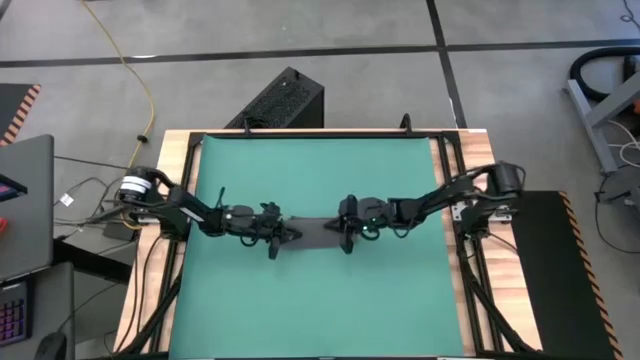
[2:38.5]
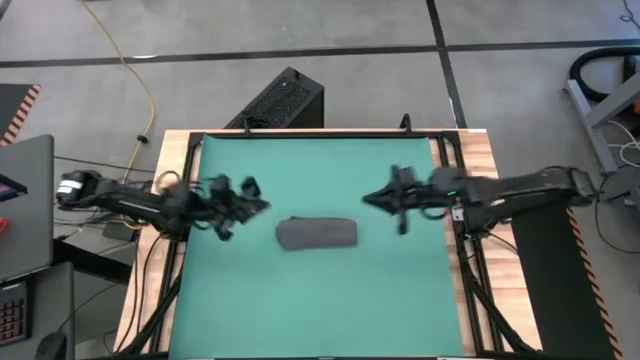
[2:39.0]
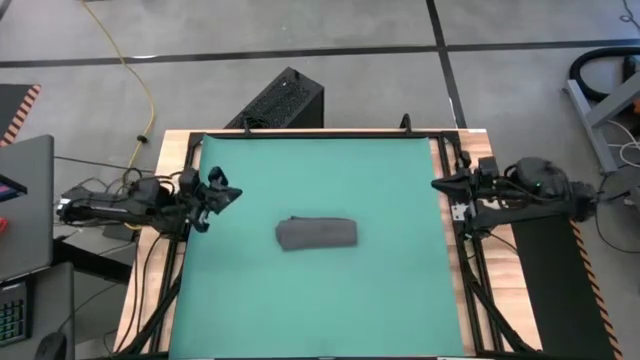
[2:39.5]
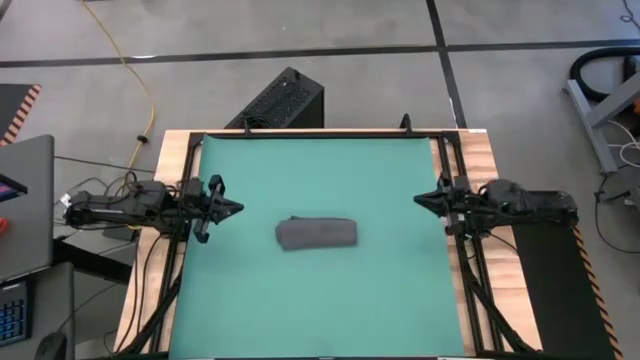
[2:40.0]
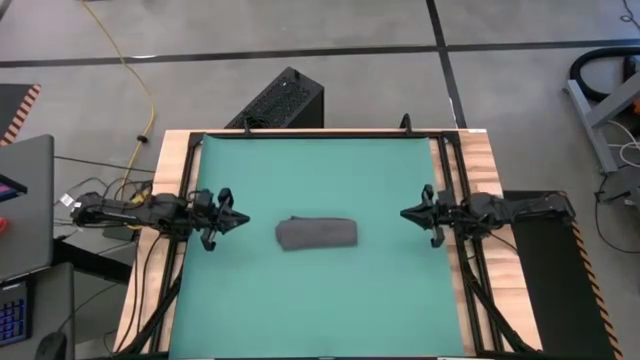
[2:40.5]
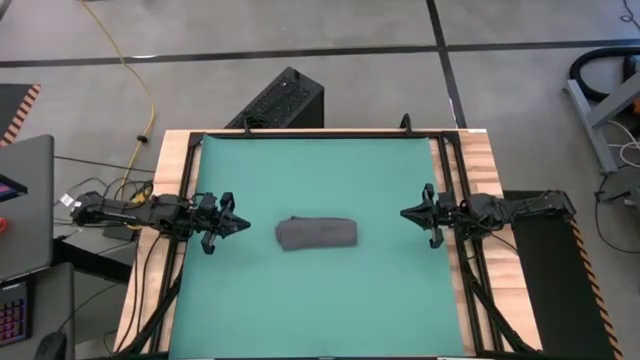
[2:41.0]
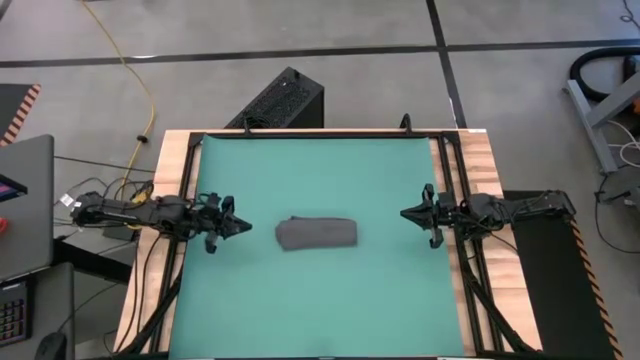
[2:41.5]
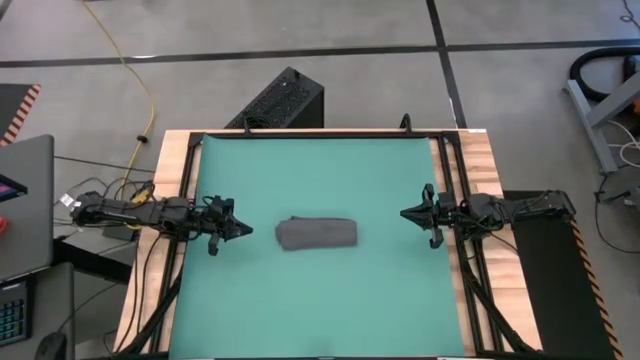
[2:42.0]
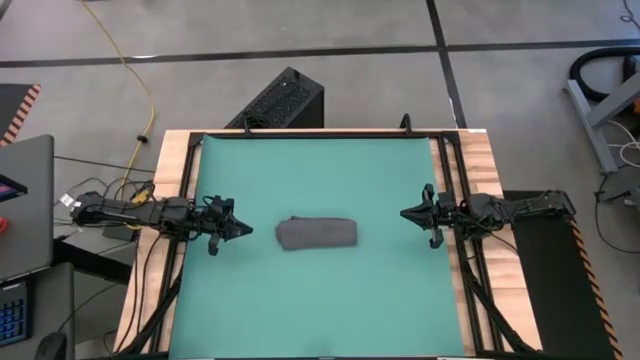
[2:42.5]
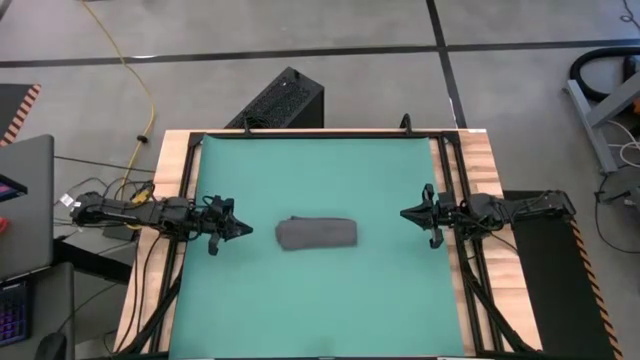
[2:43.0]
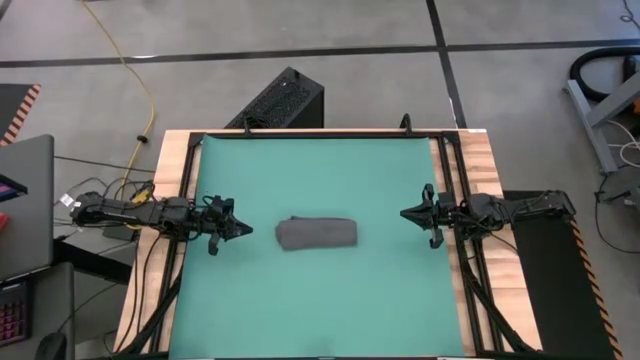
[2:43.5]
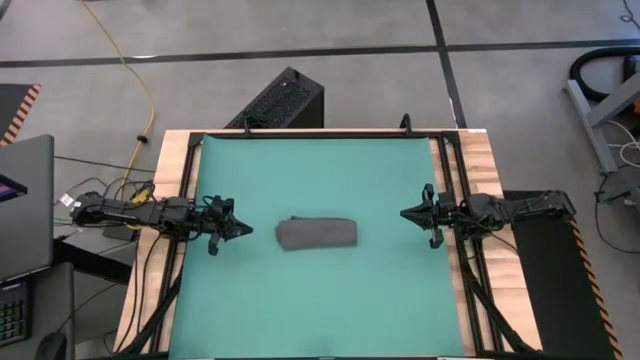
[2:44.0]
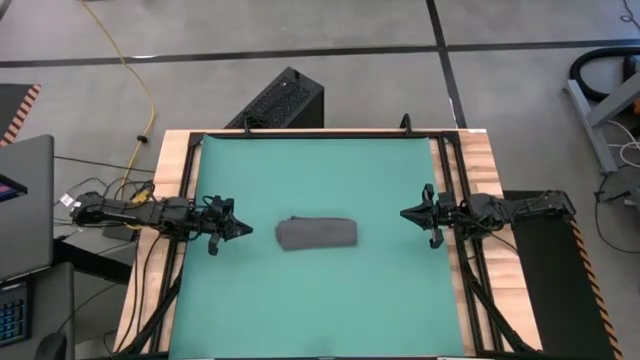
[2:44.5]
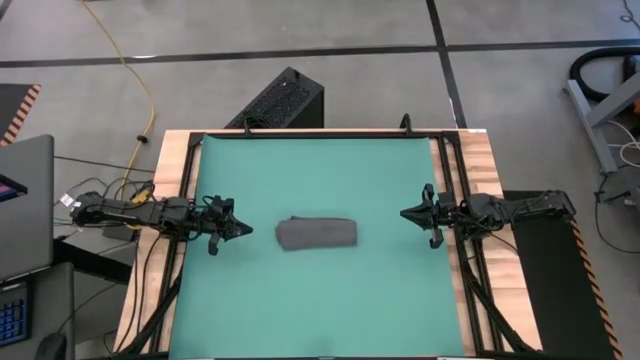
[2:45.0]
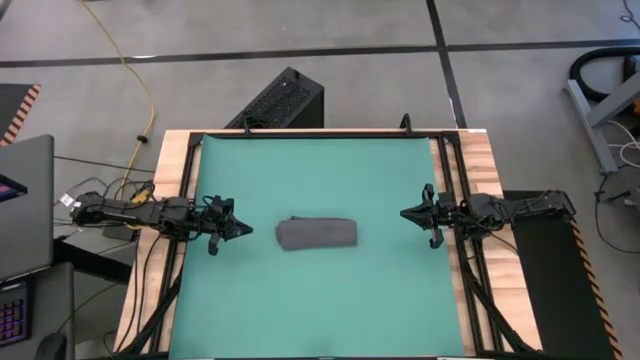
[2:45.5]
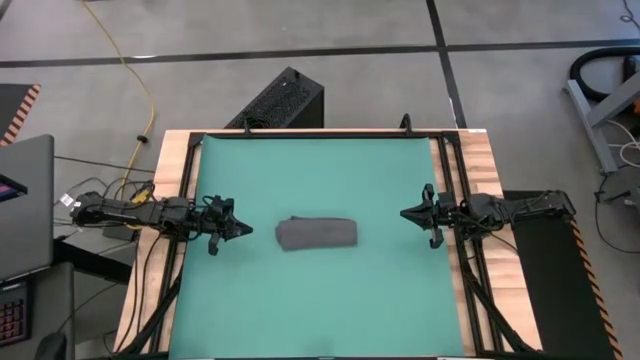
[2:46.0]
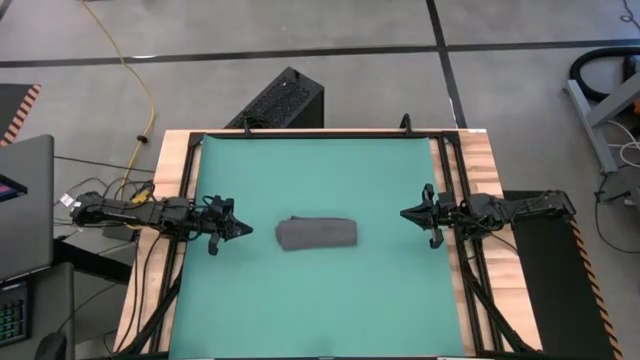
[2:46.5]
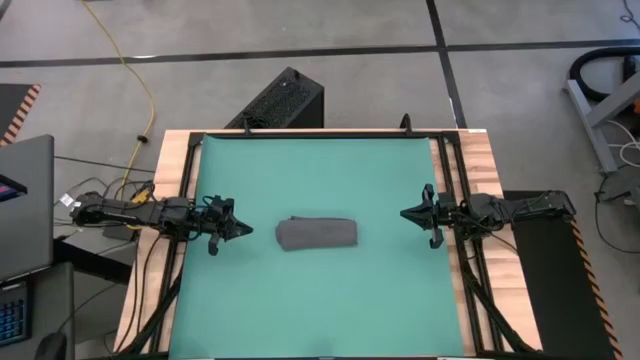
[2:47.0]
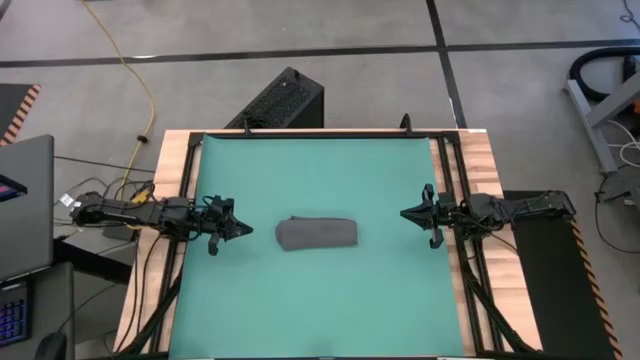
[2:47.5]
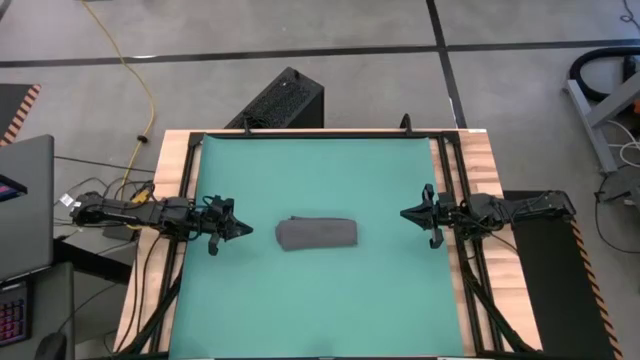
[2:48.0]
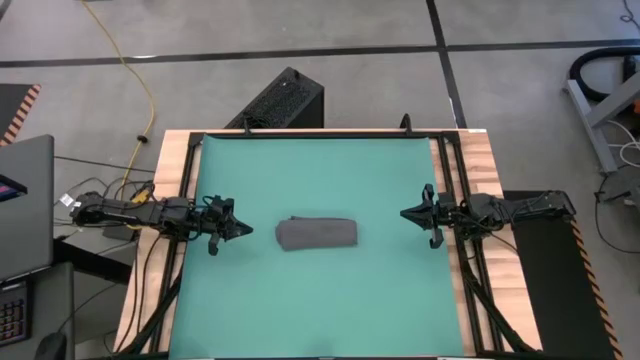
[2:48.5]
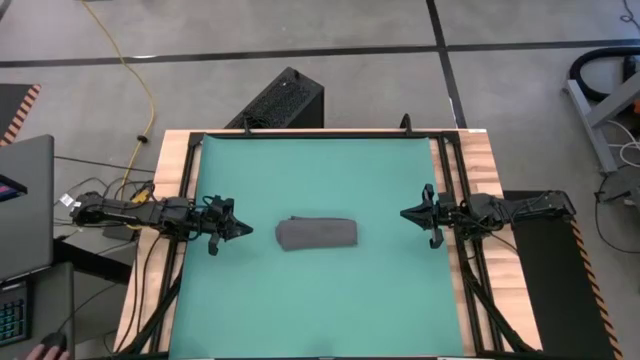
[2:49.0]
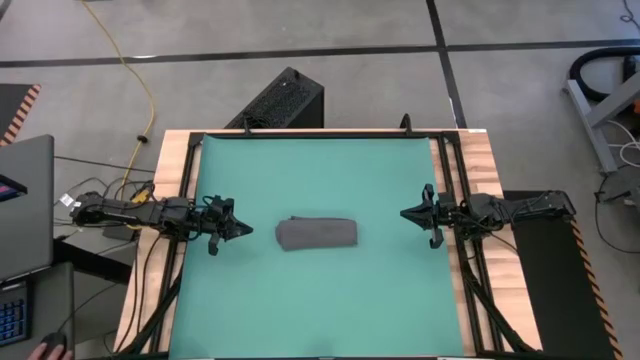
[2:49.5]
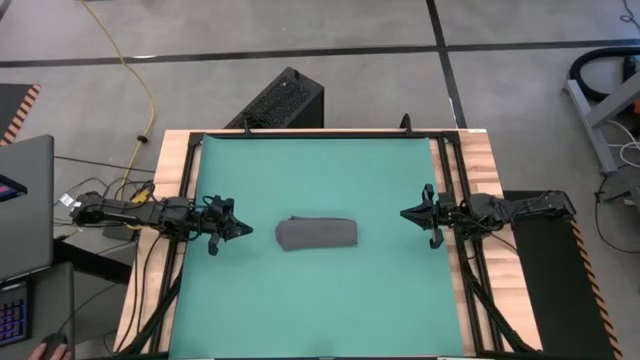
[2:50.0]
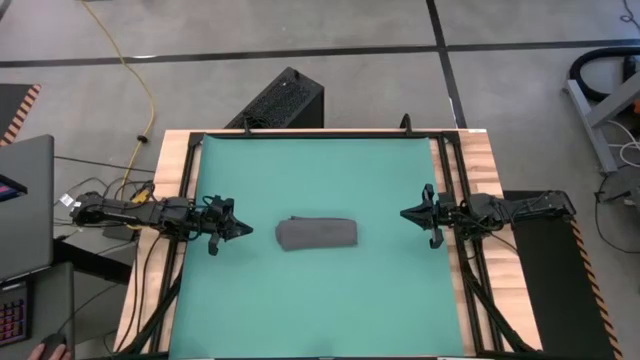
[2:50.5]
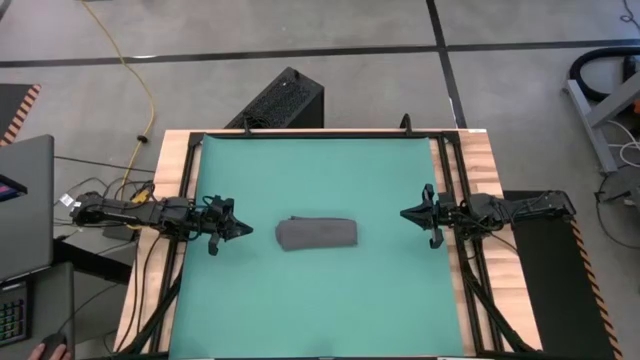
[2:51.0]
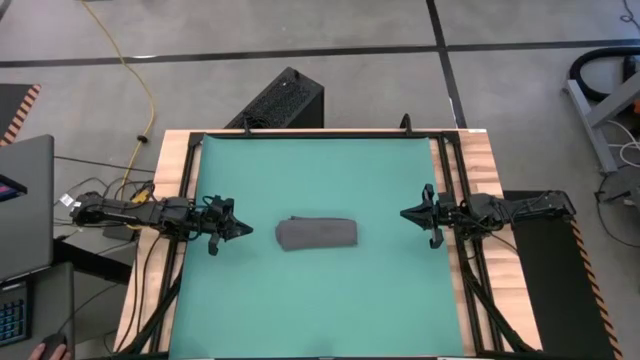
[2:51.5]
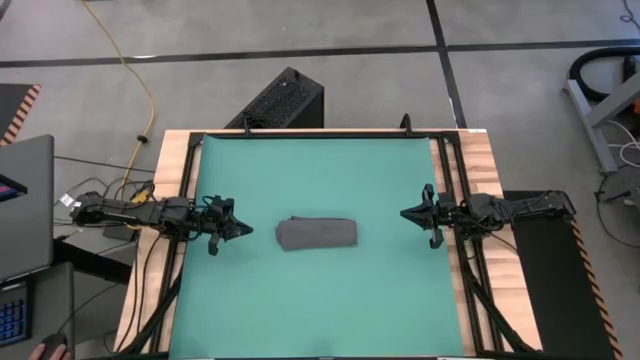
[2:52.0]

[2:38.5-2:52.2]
Task: Roll towel
Return to Home Position
